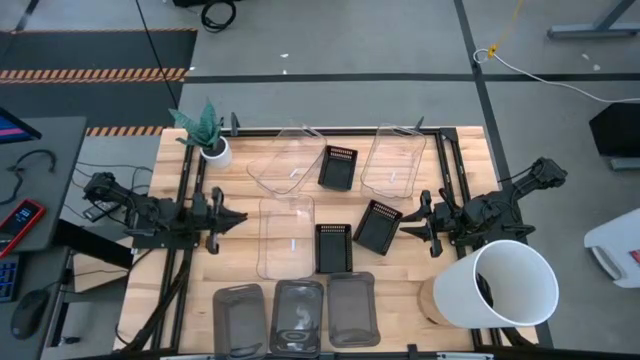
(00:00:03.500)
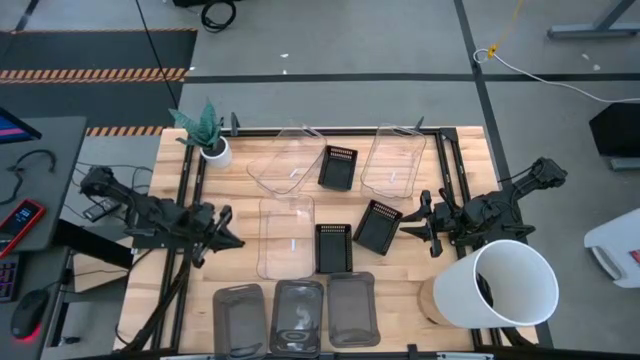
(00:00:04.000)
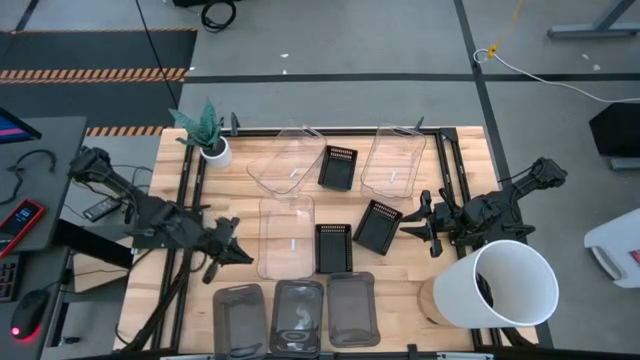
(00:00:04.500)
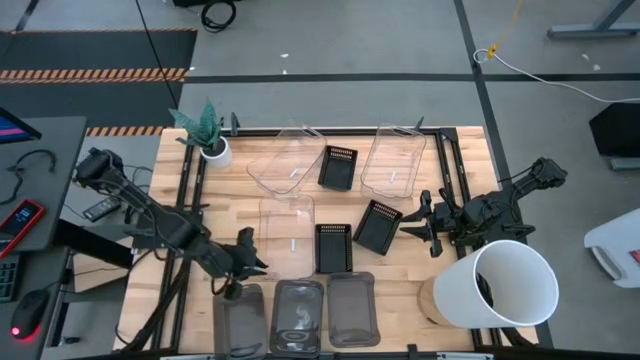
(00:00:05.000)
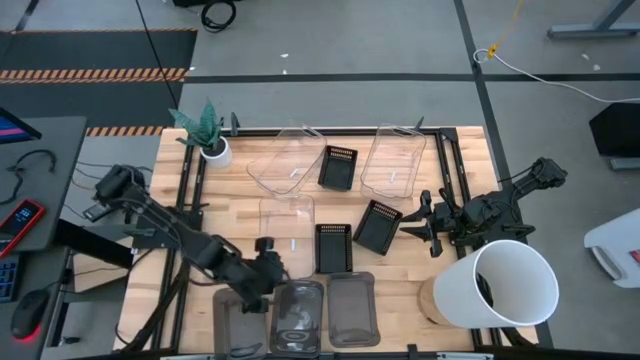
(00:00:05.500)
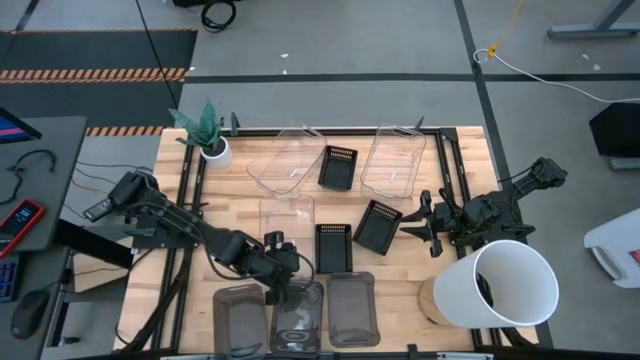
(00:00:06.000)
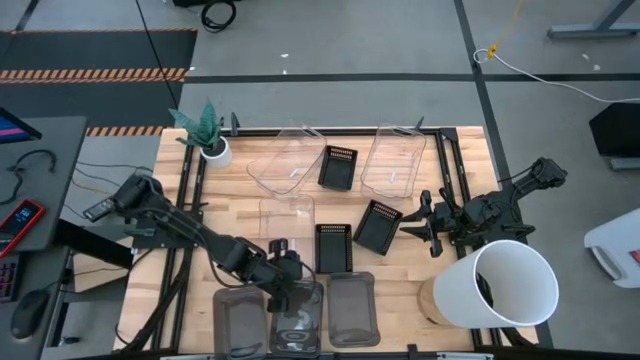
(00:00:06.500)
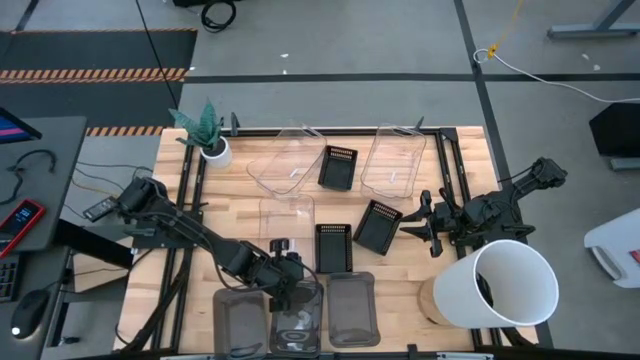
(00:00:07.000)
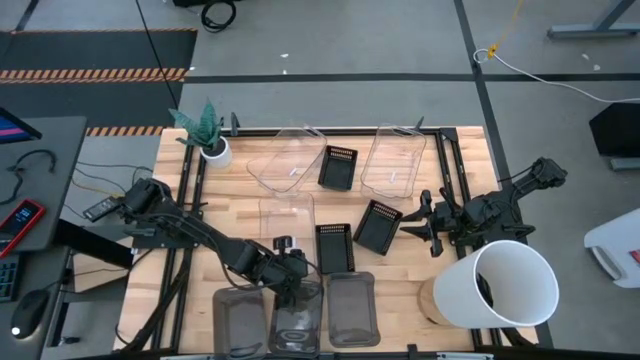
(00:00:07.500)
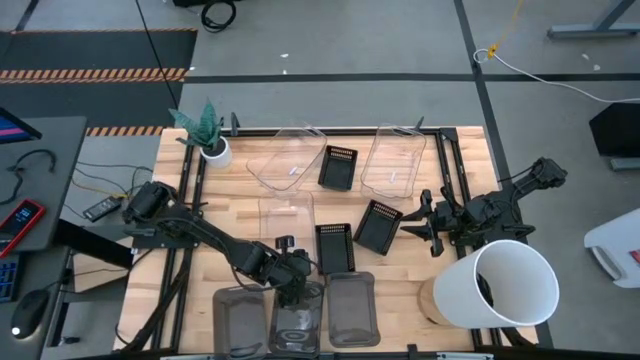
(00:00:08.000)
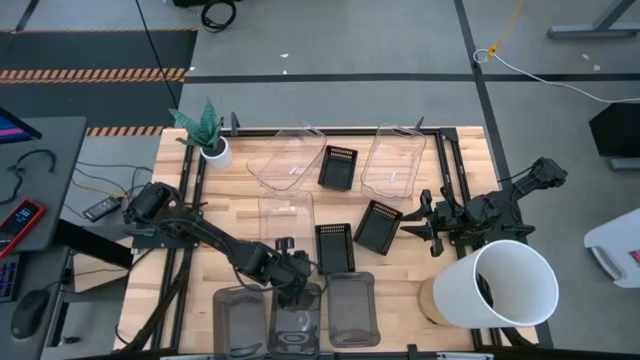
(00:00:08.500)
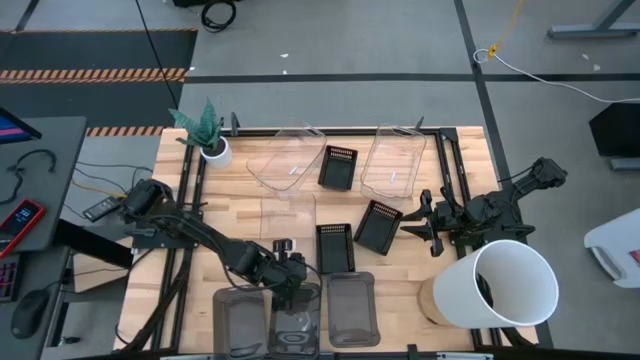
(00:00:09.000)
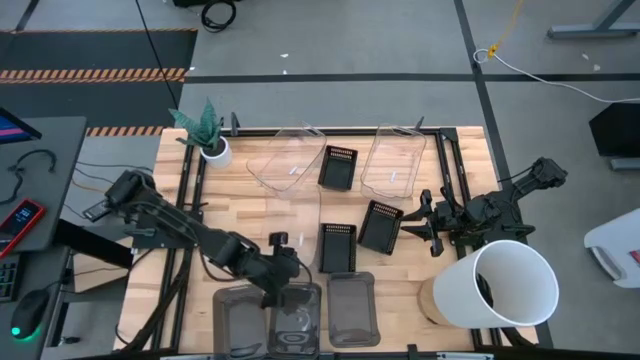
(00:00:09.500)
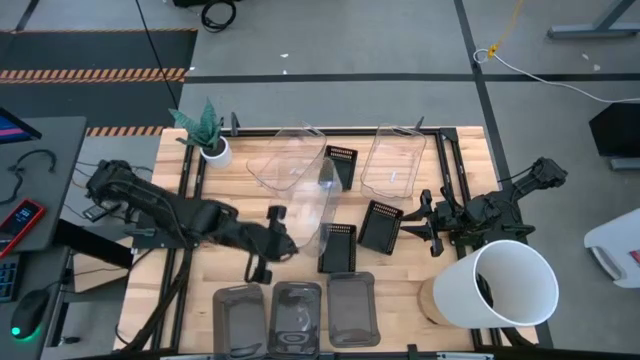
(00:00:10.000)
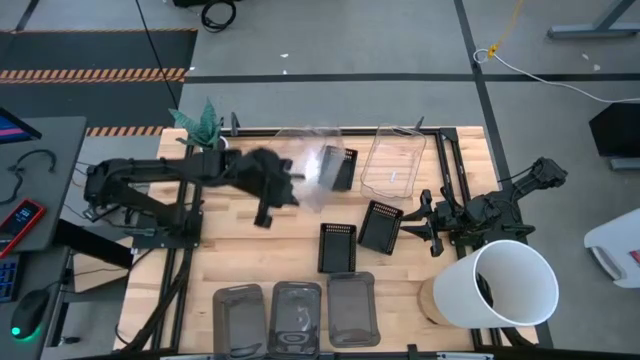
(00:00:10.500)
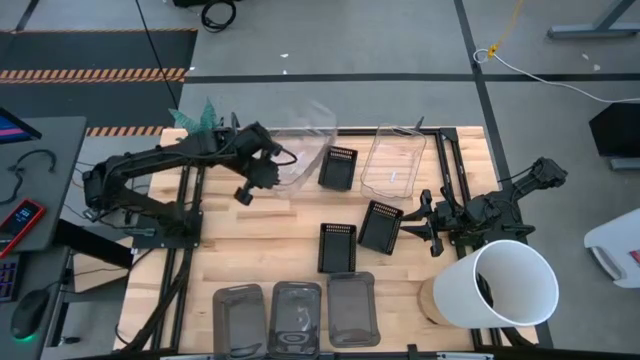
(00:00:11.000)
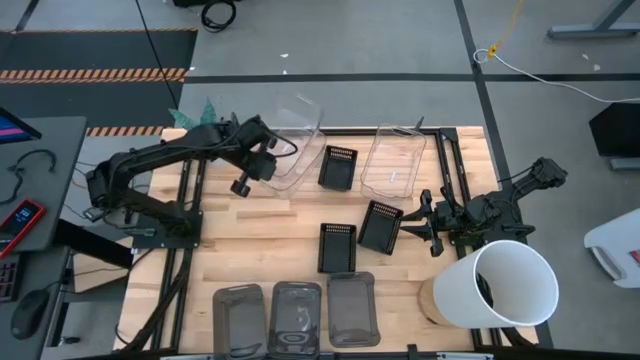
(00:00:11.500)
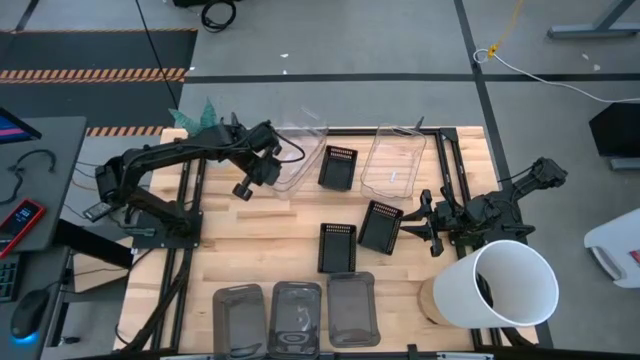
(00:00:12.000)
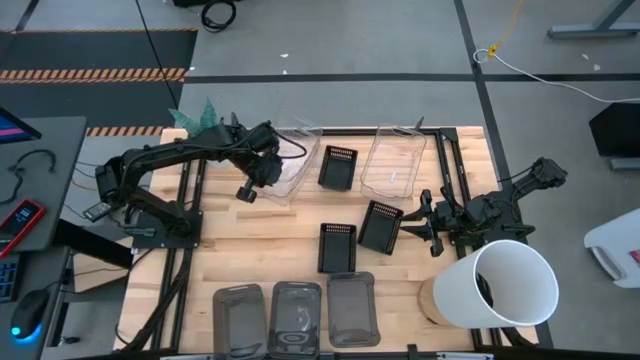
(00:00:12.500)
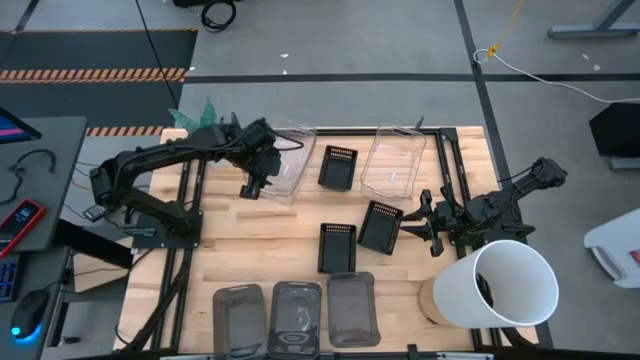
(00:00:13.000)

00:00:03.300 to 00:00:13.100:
Stack the bottom transparent bin on top of the top left transparent bin

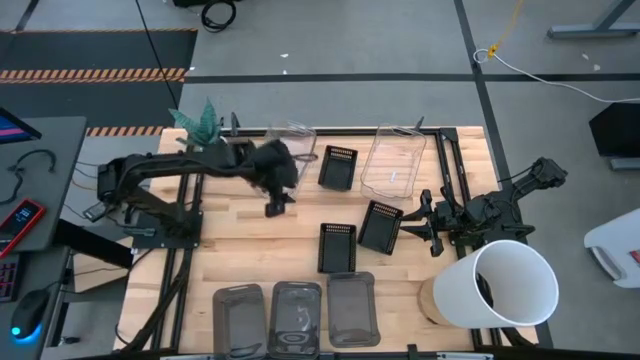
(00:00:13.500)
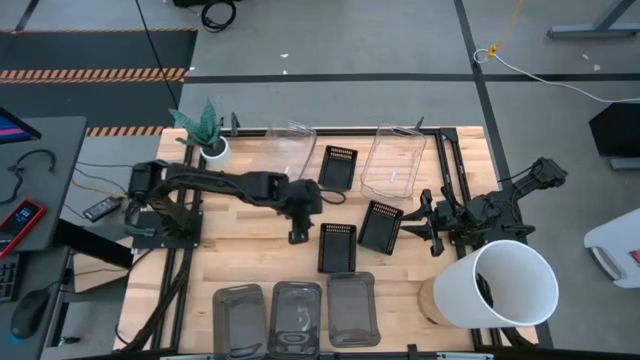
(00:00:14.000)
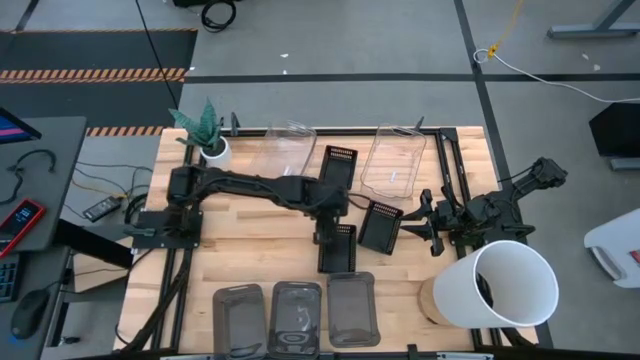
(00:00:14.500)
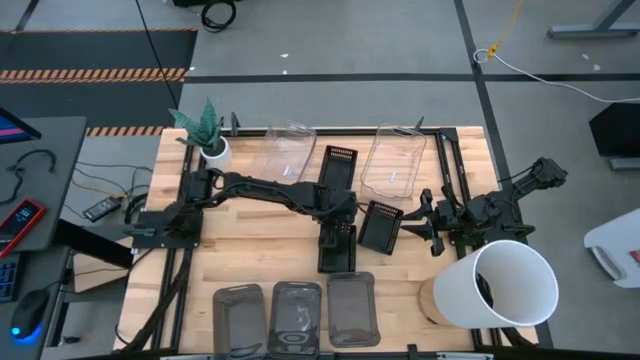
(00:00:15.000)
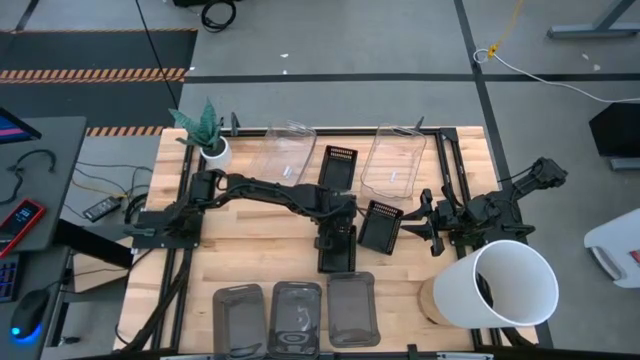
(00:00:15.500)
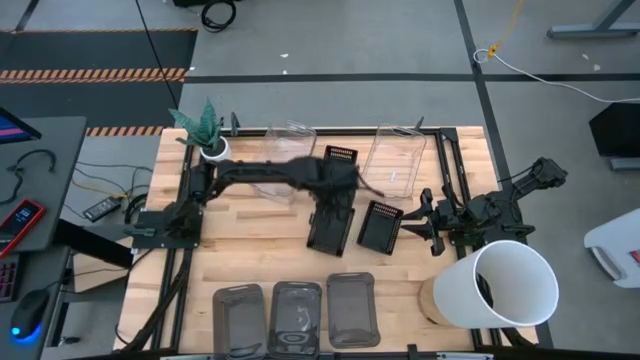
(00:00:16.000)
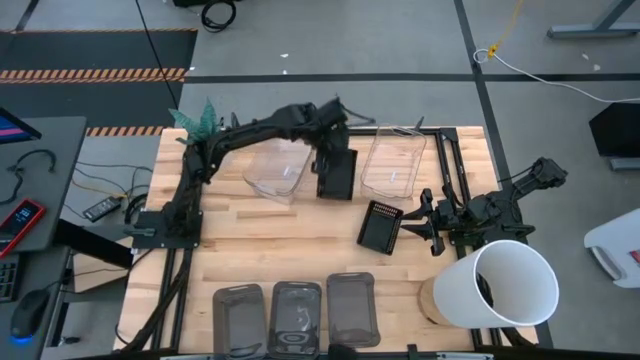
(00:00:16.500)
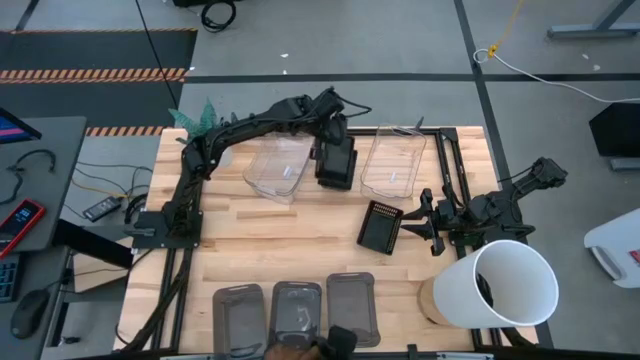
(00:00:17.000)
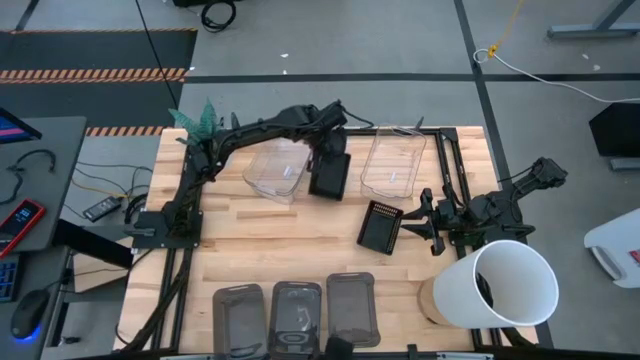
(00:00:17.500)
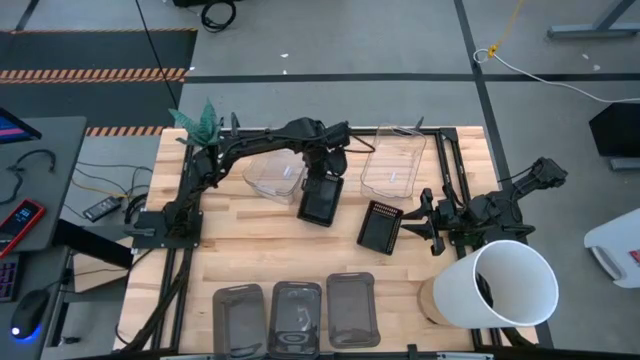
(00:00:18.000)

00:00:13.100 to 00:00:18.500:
Stack the bottom black bin on top of the top black bin

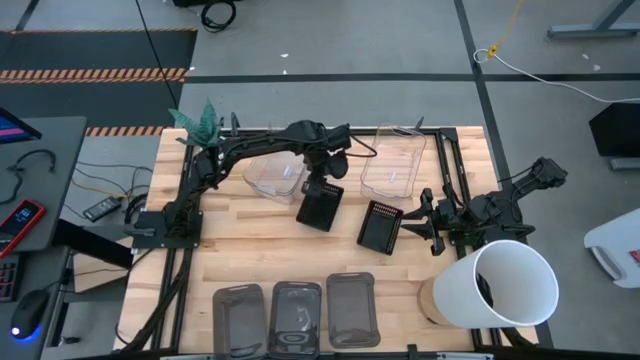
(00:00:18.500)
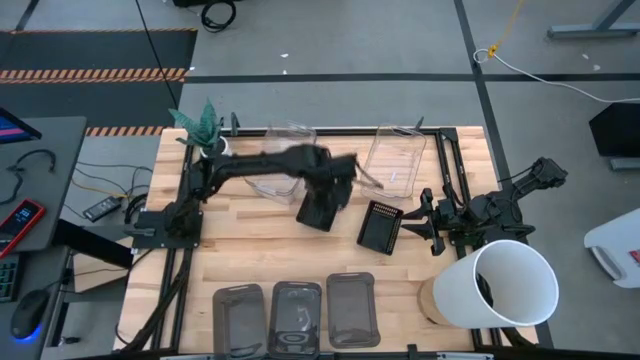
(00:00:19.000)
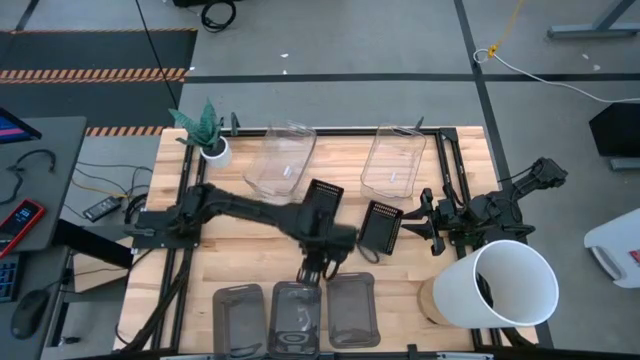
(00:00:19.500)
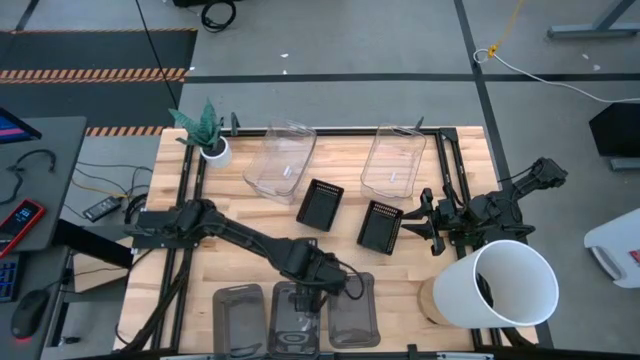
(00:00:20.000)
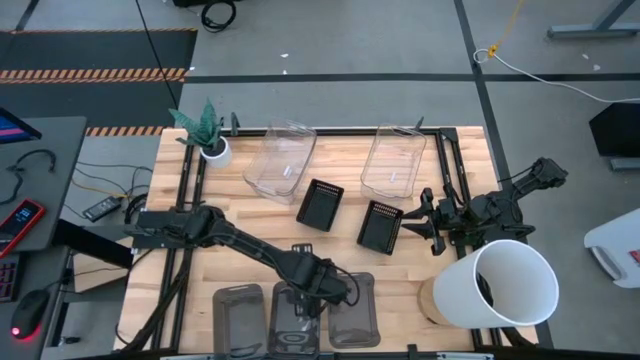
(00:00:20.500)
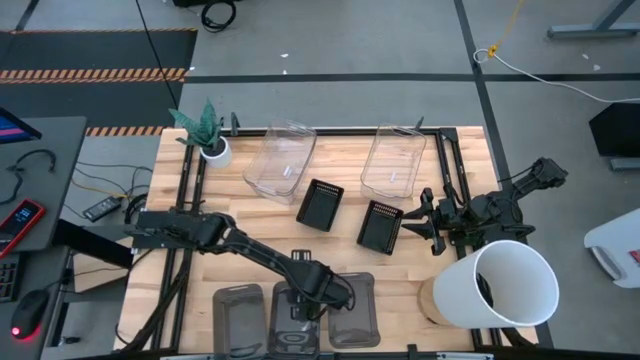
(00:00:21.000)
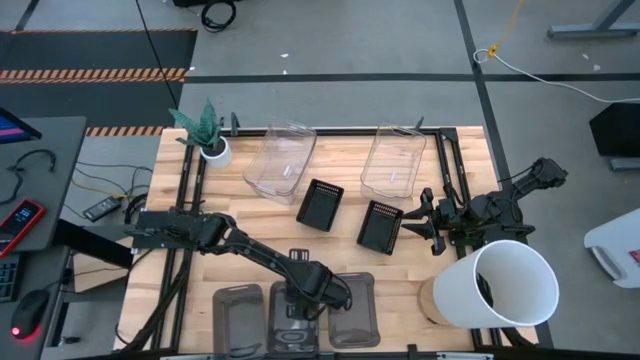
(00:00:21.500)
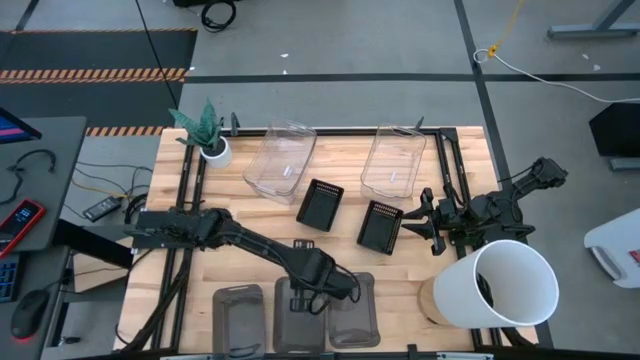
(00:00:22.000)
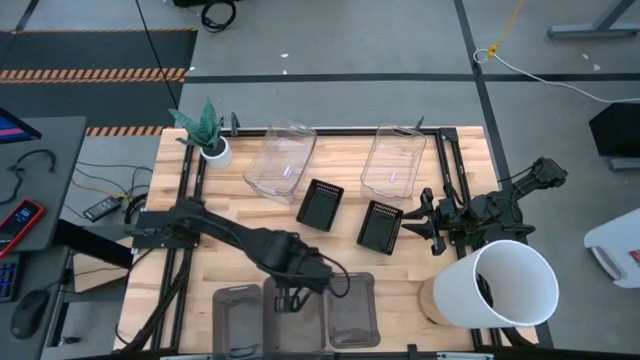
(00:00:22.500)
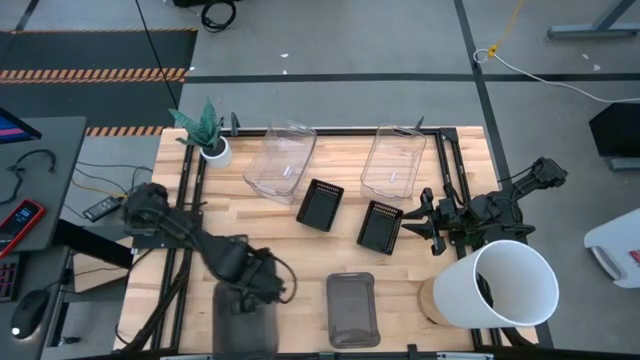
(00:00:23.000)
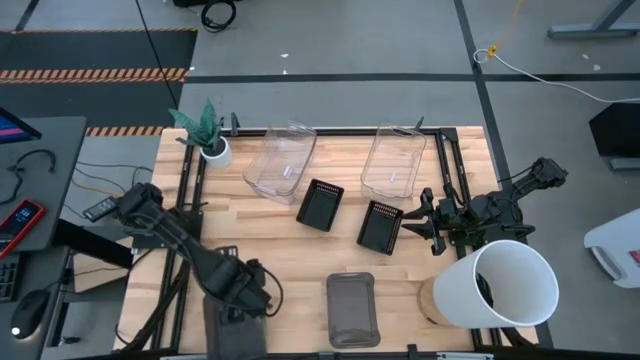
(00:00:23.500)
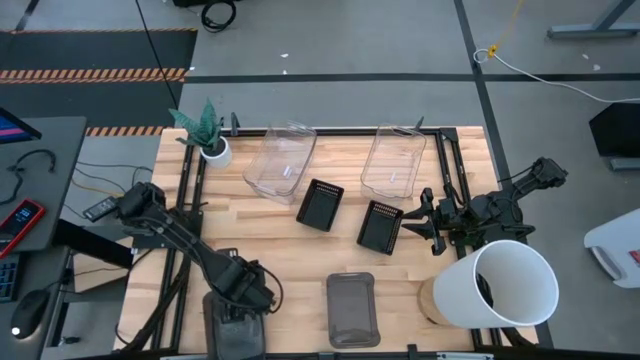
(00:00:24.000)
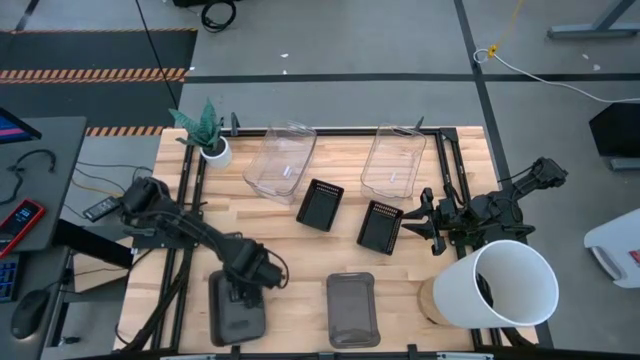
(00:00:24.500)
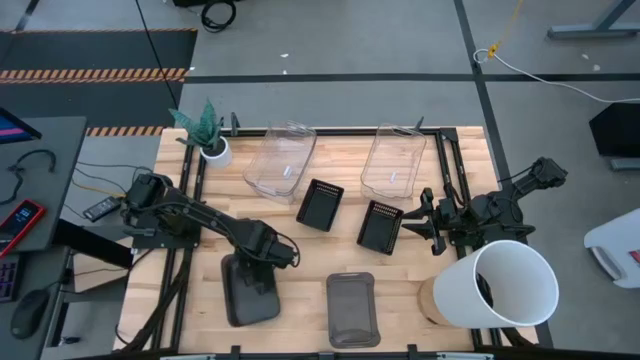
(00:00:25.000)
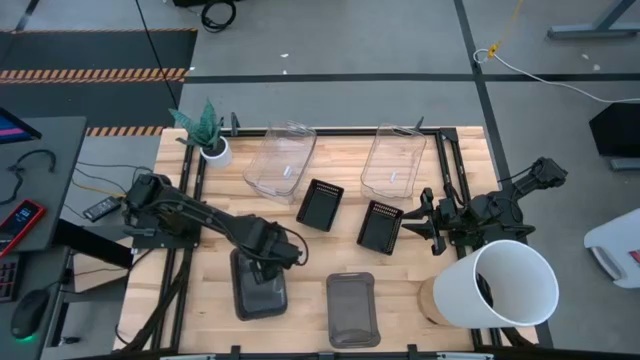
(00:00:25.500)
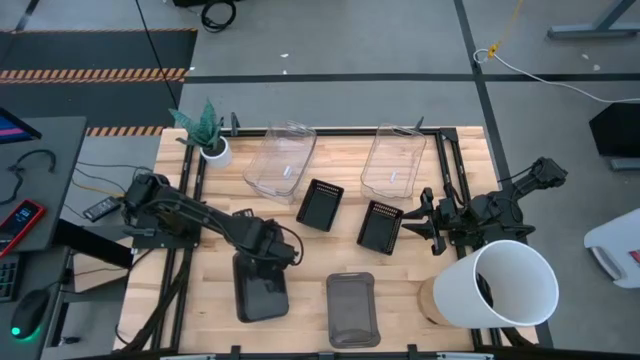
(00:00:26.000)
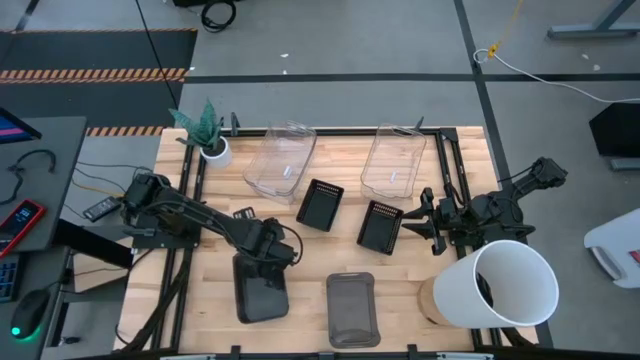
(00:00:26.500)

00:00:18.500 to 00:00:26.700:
Stack the middle black transparent bin on top of the left black transparent bin
